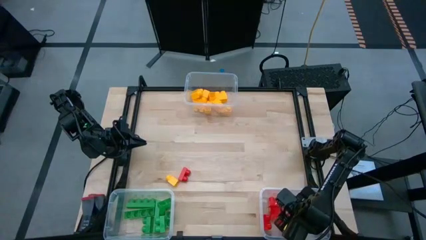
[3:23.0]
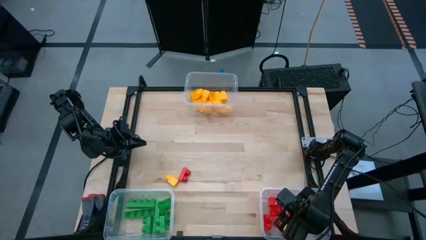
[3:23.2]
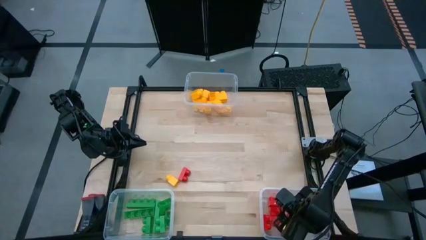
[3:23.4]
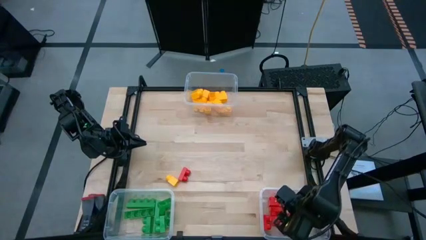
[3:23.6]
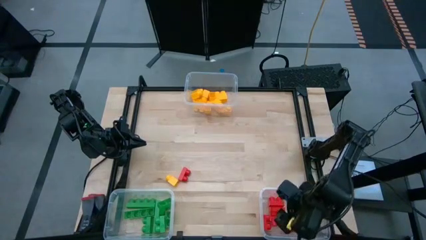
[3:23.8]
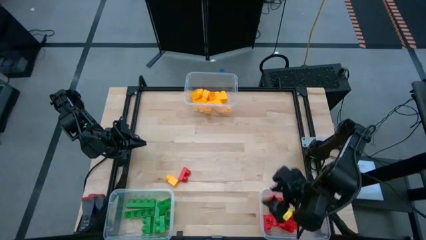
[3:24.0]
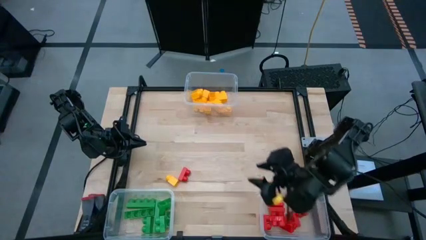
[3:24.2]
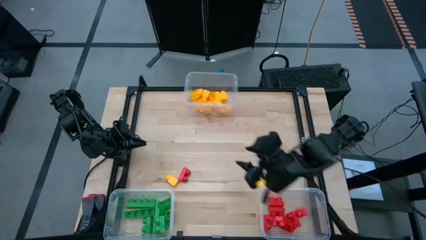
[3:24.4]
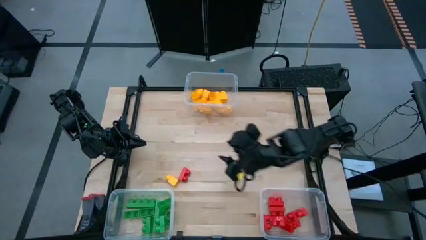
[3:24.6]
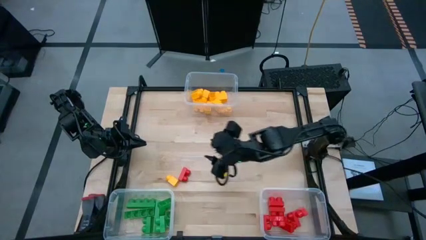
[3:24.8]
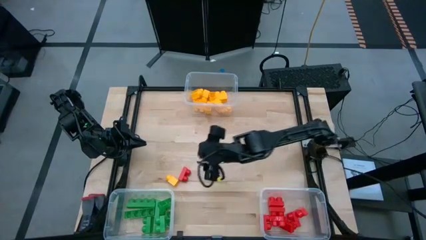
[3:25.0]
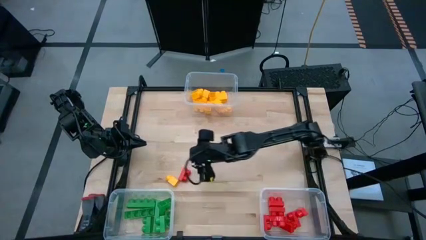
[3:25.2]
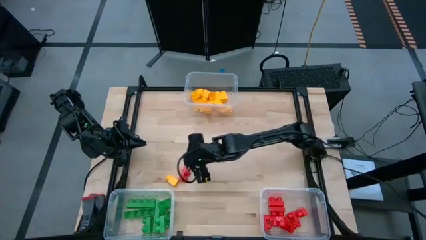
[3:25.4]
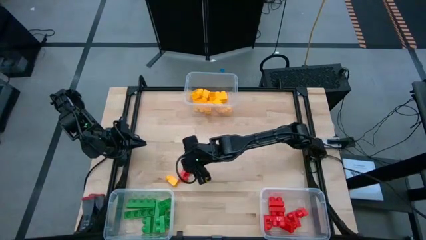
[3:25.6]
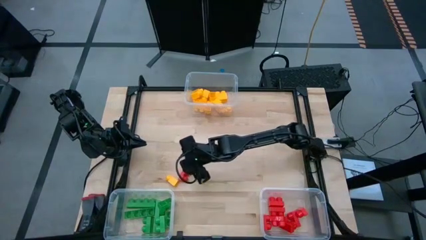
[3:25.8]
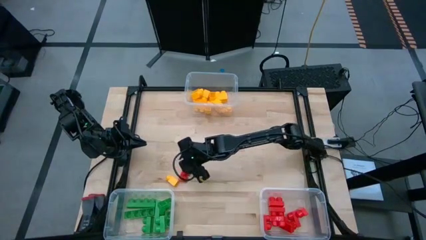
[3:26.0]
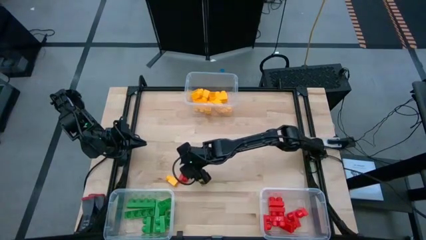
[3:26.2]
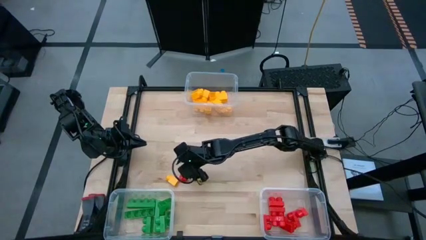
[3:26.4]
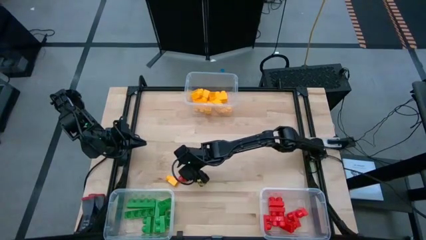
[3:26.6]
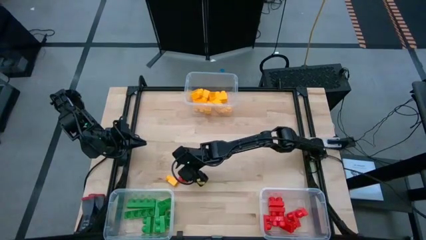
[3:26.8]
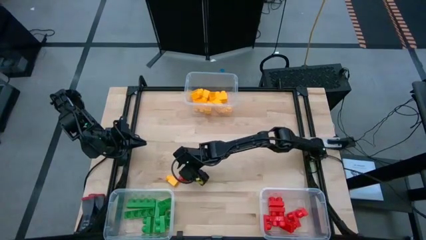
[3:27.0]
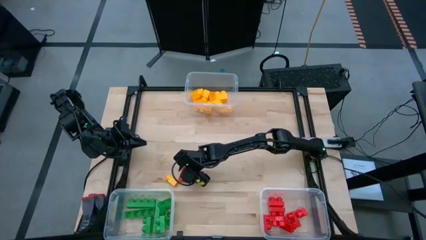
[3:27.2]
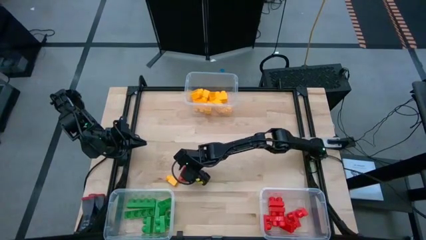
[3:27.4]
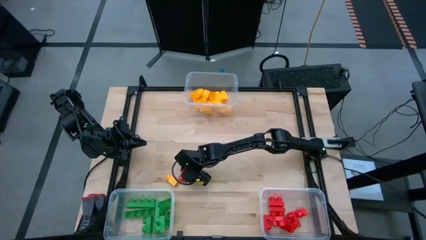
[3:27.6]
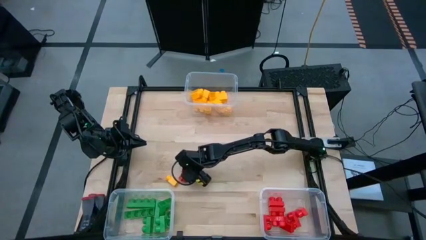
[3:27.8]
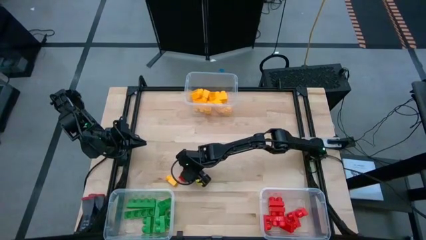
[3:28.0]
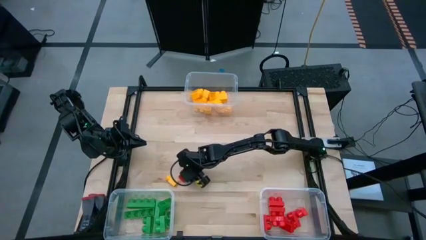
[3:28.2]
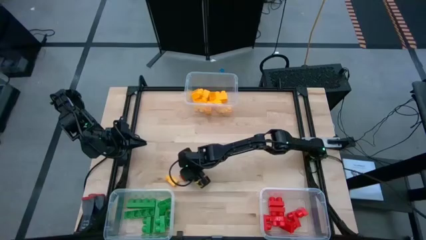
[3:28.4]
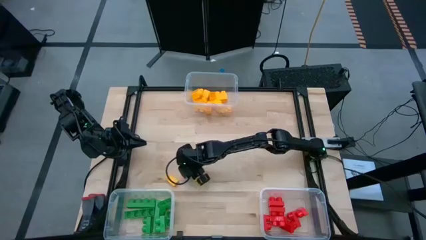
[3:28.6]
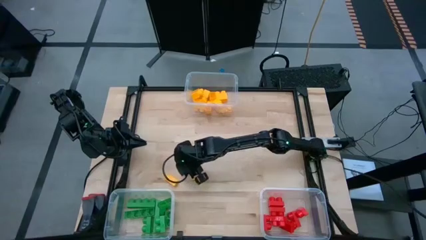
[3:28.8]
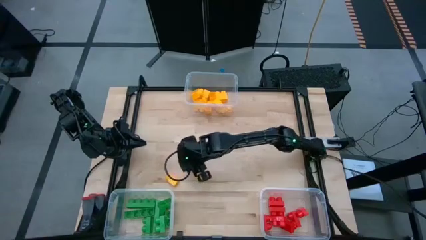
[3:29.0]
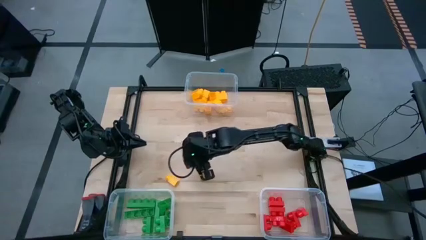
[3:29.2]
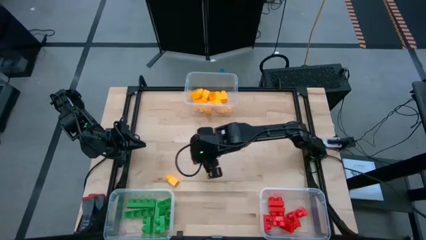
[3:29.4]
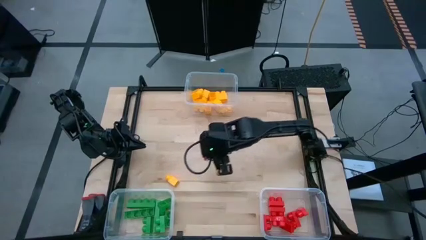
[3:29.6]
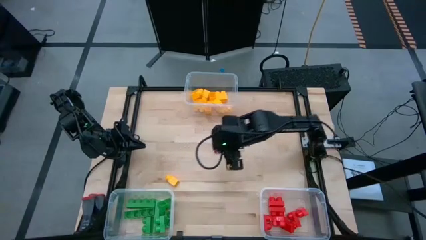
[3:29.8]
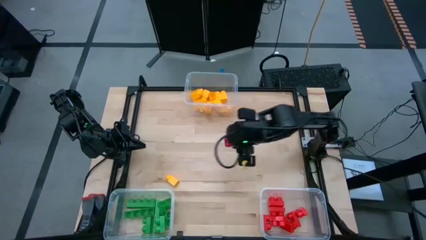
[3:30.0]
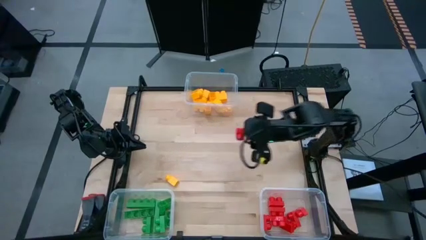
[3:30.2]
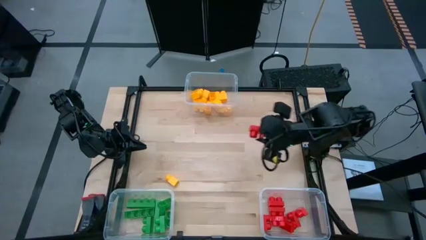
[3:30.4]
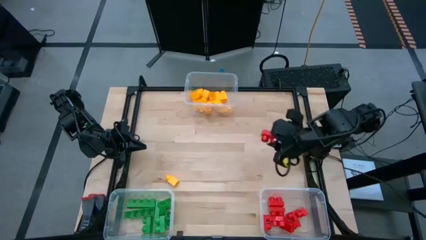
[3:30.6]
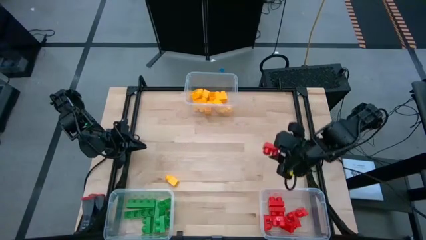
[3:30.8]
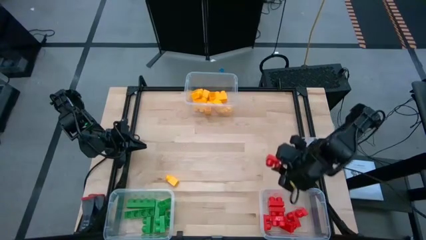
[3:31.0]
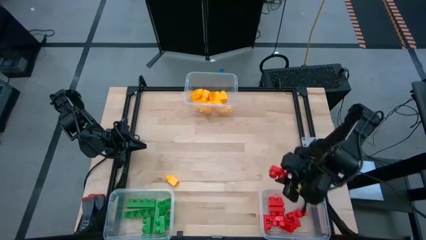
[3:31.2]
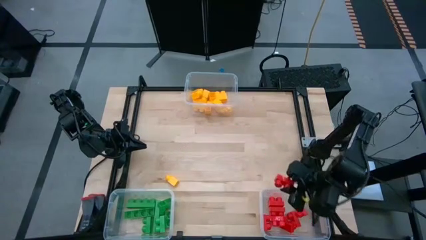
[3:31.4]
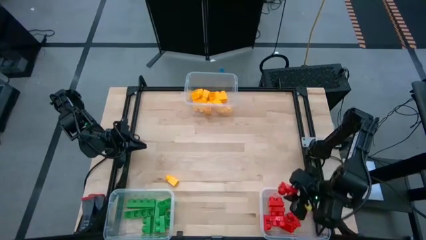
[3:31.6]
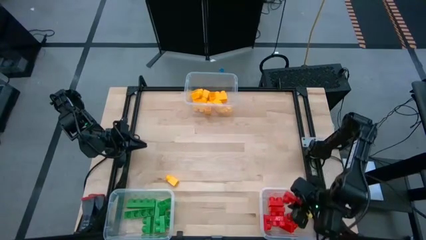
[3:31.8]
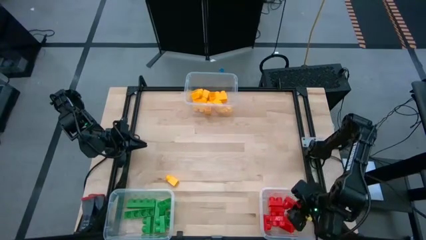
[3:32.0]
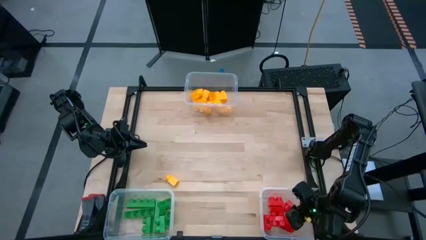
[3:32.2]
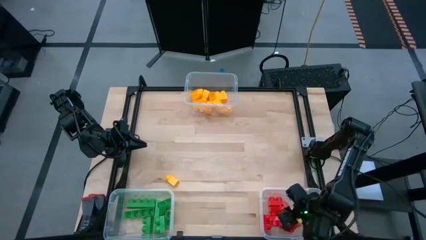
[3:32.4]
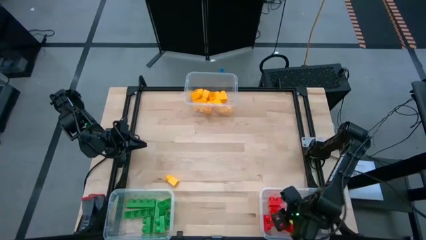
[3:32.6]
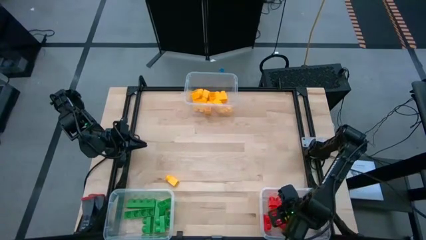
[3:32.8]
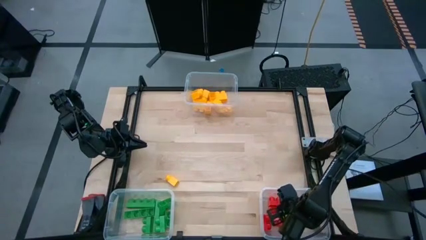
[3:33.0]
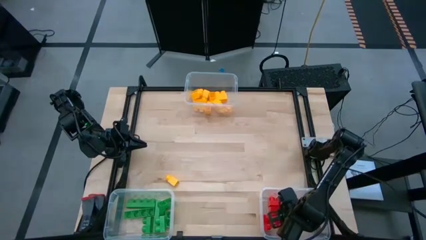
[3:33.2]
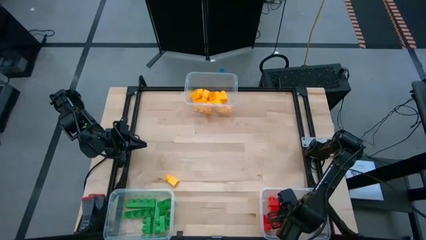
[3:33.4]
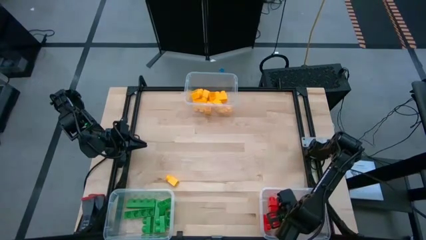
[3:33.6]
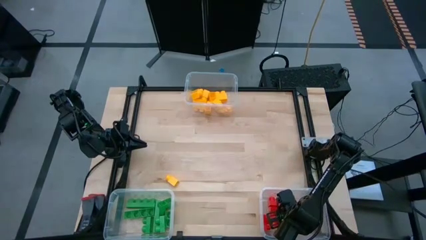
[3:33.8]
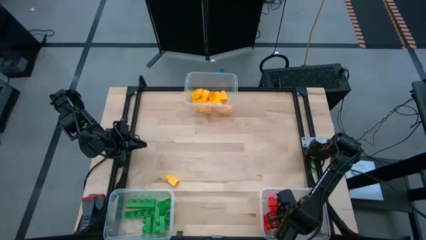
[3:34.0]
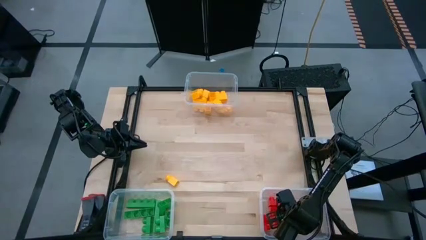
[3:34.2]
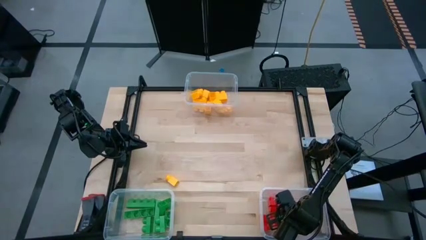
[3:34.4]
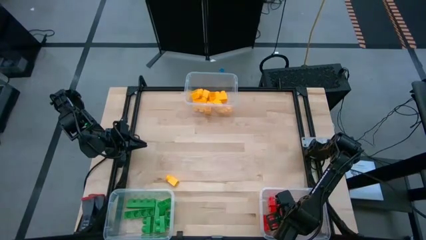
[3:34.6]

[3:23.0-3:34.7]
Task: Sort blocks
Put the red game piece into the bottom right transparent bin

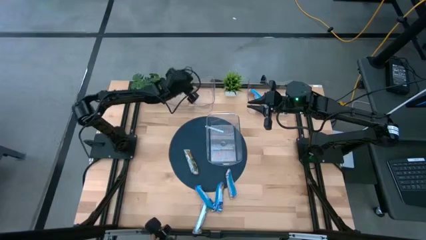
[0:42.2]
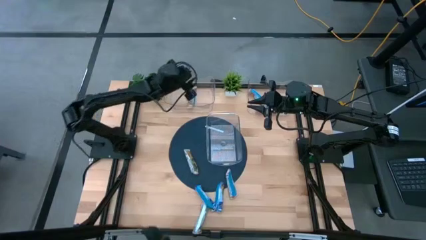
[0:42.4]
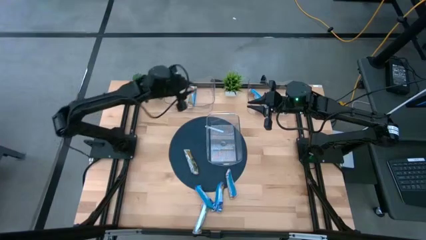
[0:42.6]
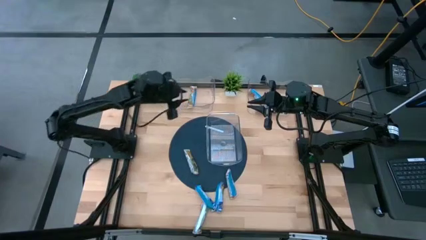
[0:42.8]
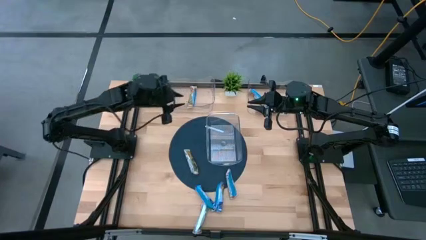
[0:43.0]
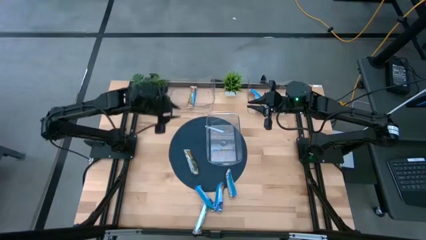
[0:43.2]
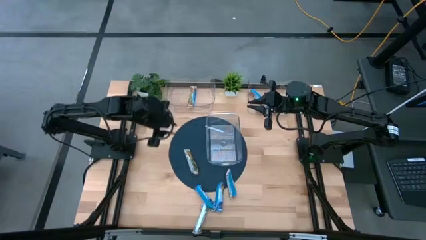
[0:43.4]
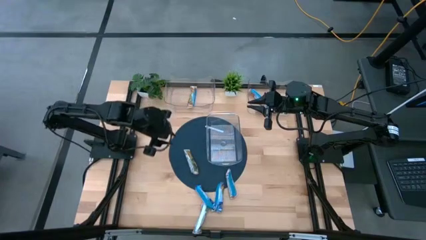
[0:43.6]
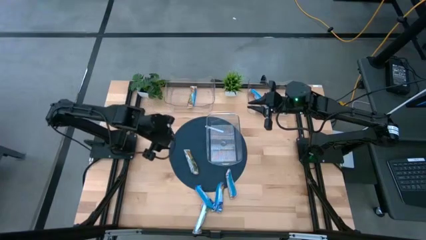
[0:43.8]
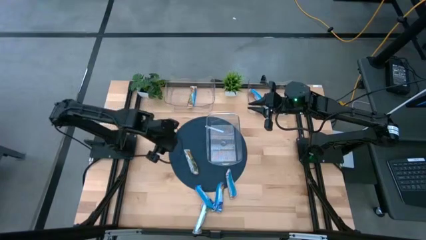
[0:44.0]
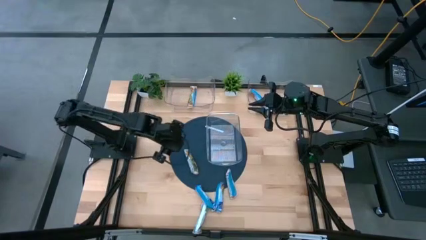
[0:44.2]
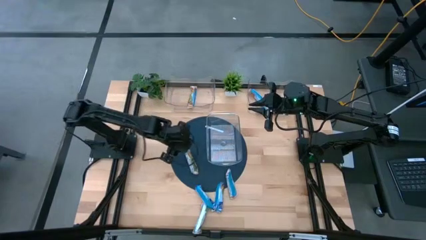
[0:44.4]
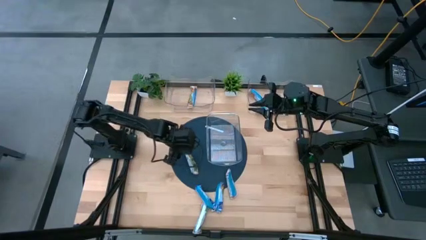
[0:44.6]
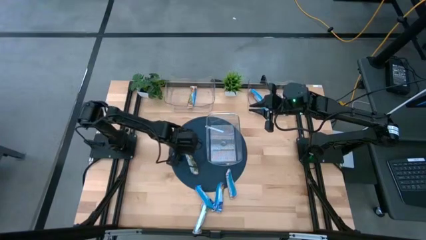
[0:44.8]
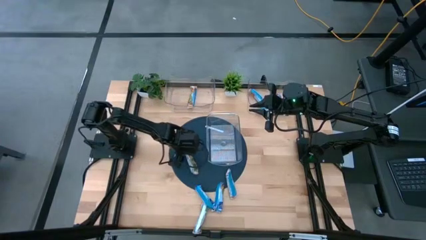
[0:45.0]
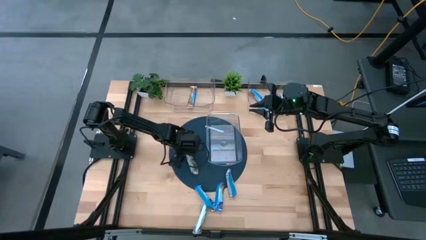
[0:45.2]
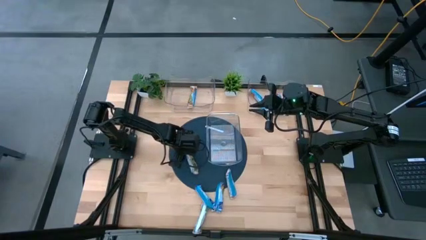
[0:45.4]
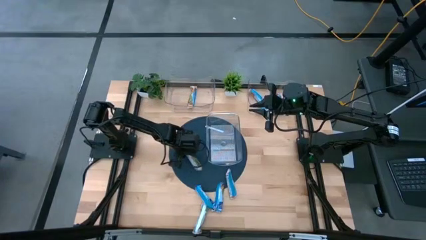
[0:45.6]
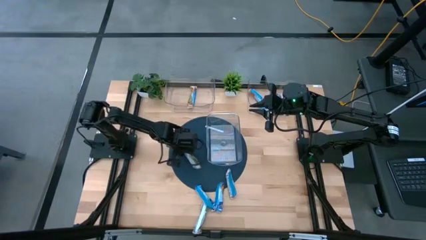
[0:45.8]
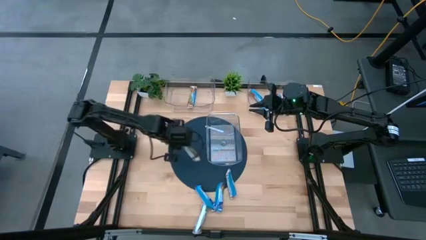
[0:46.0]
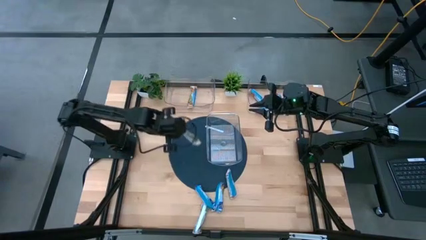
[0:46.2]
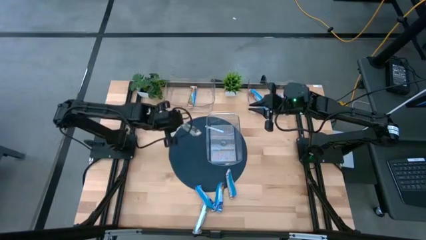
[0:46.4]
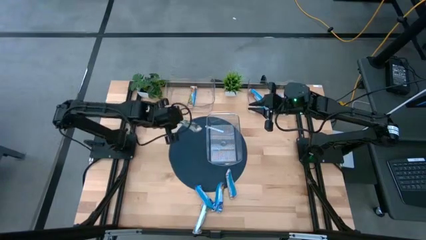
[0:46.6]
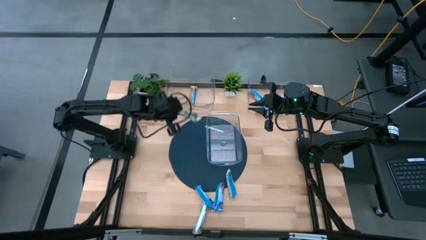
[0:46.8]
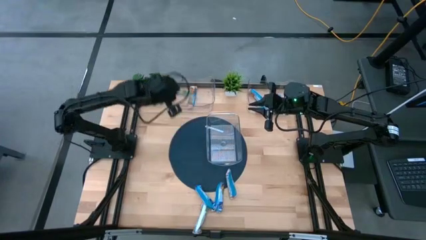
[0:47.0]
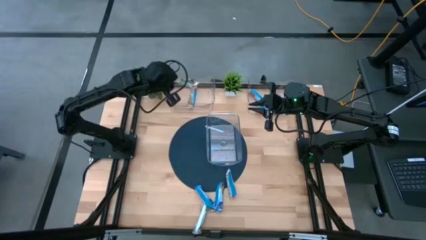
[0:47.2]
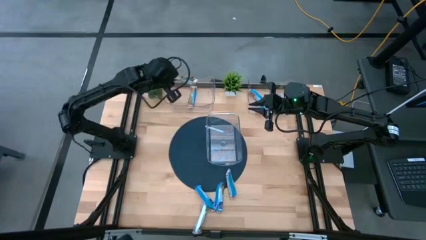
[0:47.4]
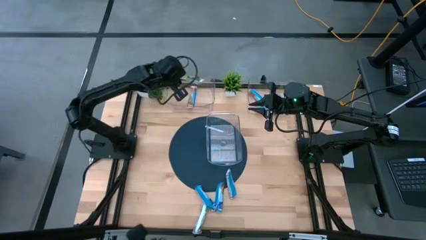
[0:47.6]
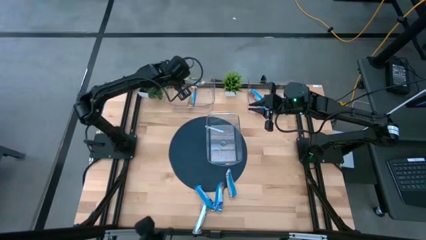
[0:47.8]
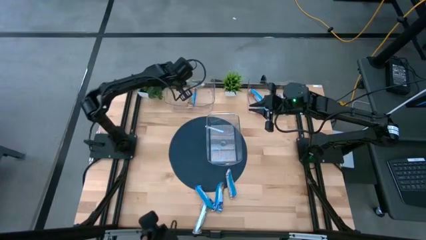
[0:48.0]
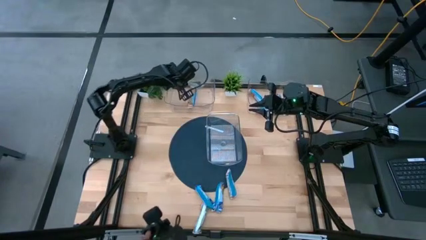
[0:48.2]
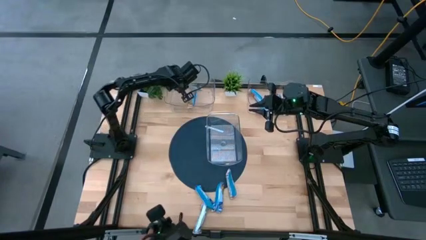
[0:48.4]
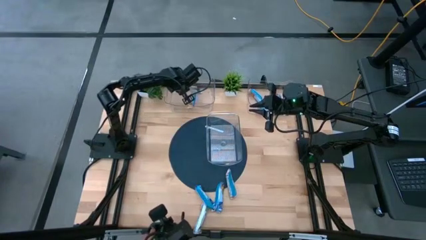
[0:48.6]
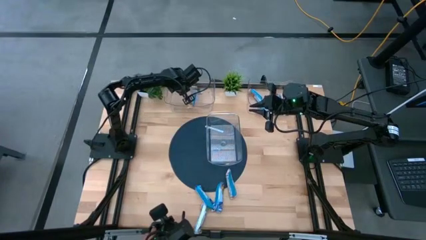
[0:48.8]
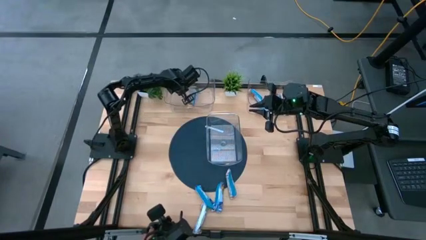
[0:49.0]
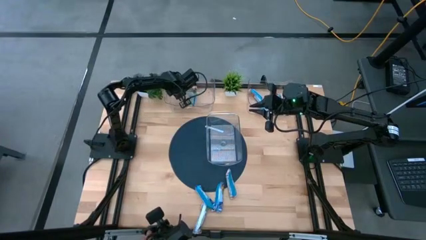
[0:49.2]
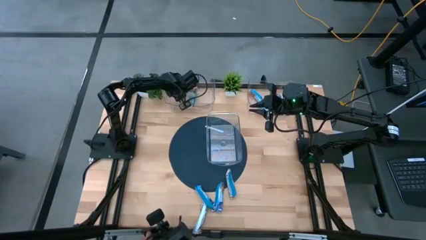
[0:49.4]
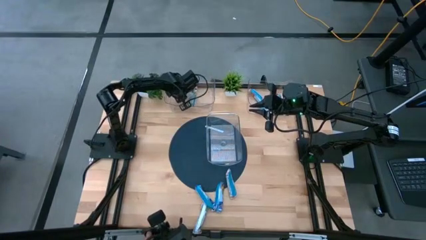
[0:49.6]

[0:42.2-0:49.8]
Task: Pick and place Granola Bars by type
Put the yellow granola bar into the top left transparent bin
